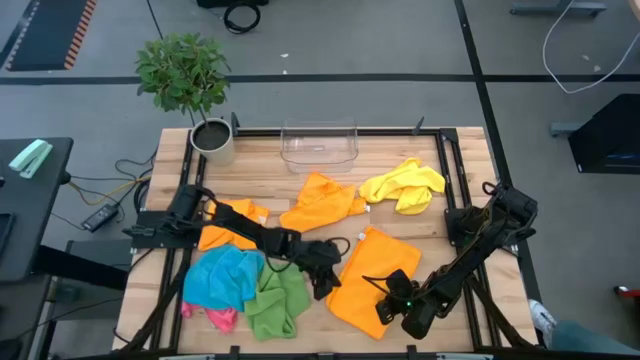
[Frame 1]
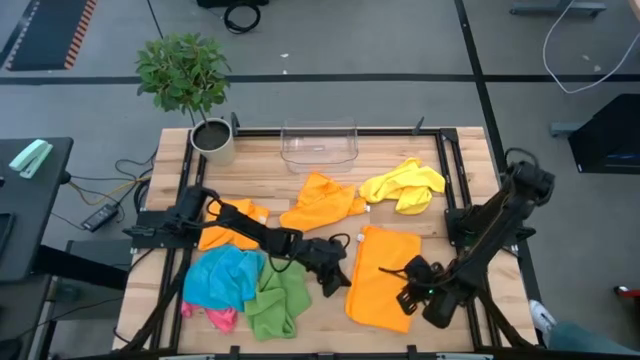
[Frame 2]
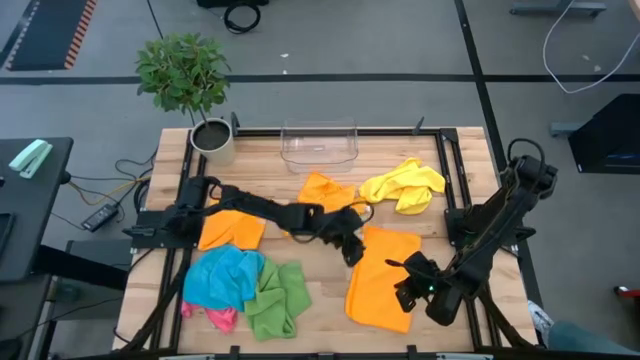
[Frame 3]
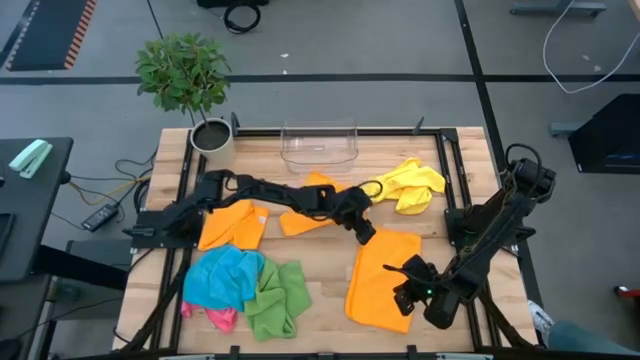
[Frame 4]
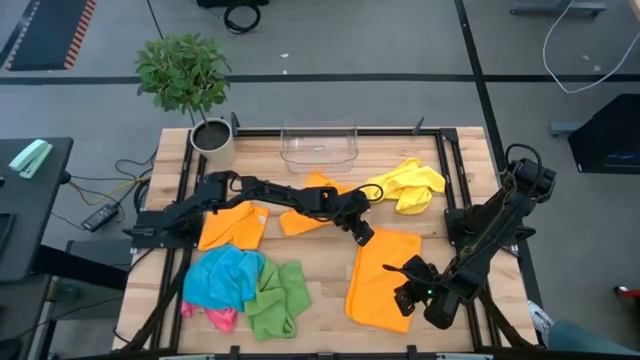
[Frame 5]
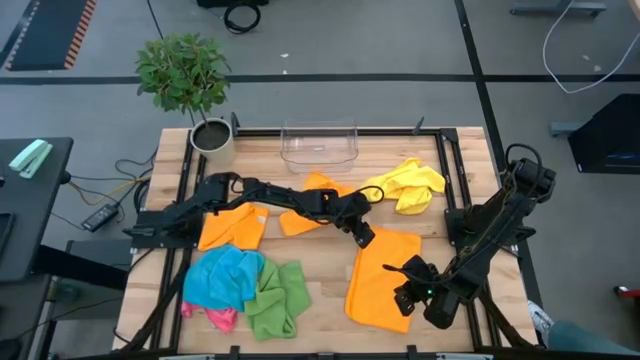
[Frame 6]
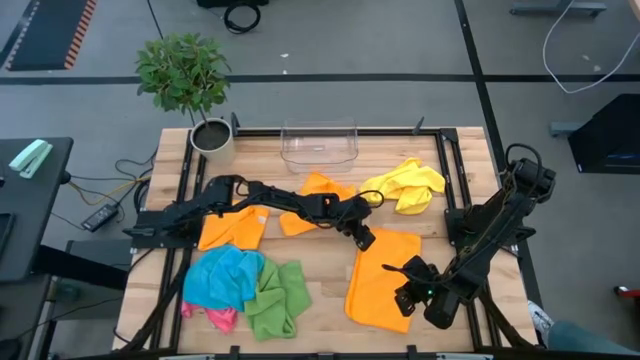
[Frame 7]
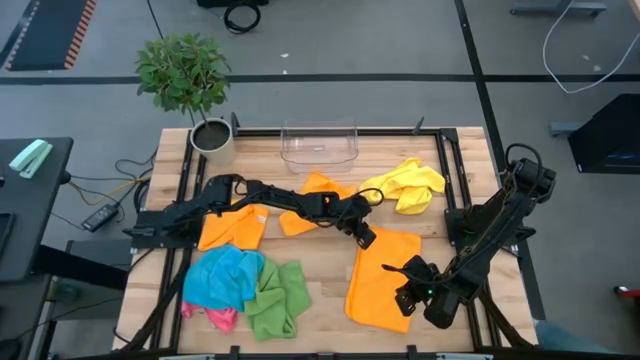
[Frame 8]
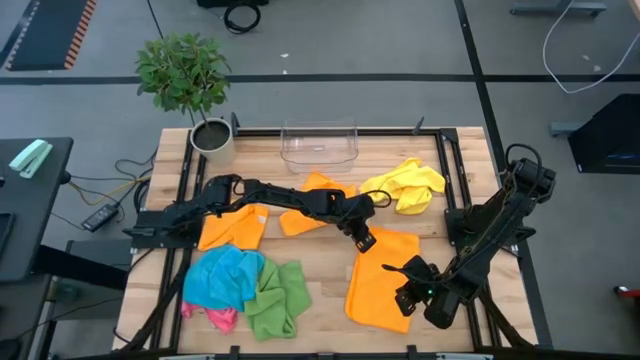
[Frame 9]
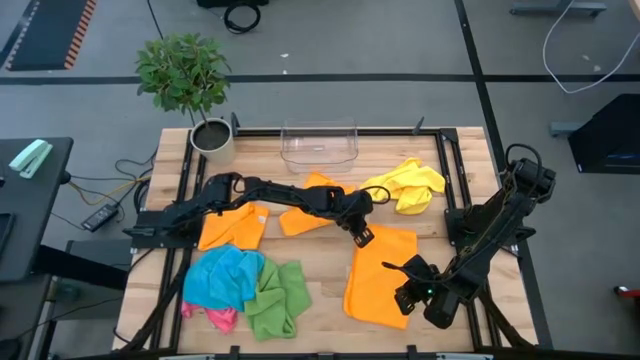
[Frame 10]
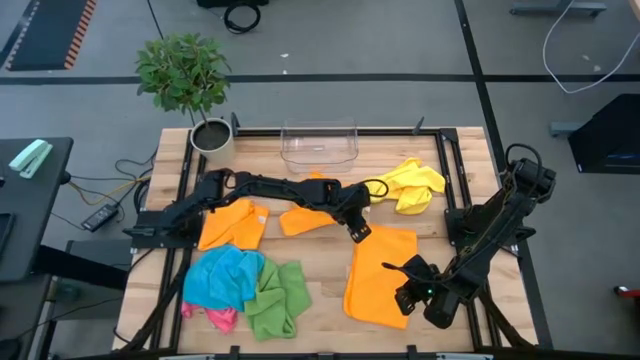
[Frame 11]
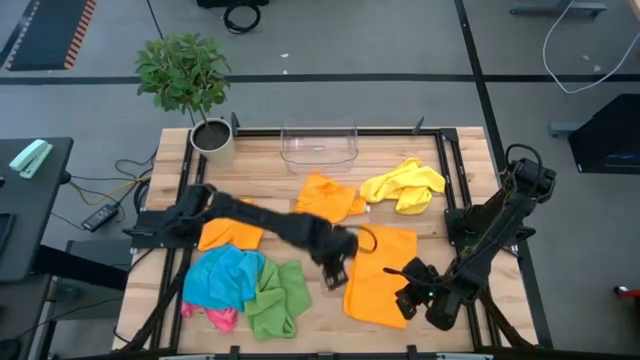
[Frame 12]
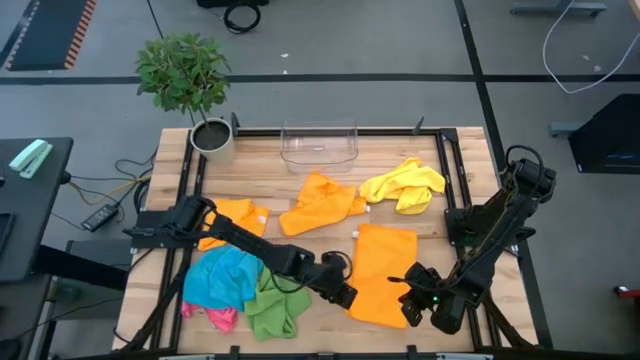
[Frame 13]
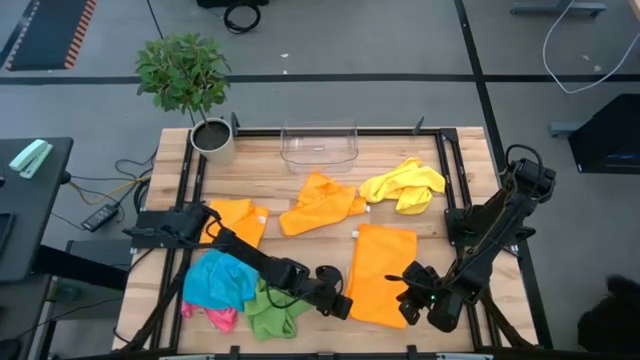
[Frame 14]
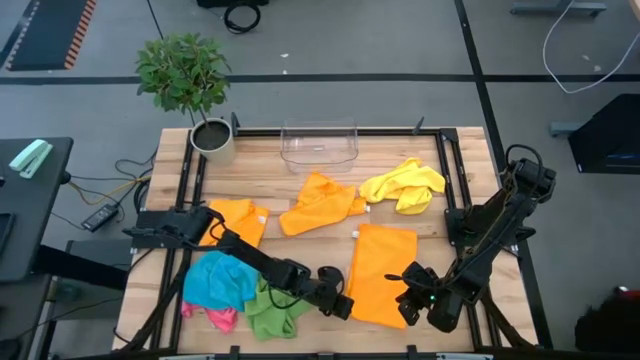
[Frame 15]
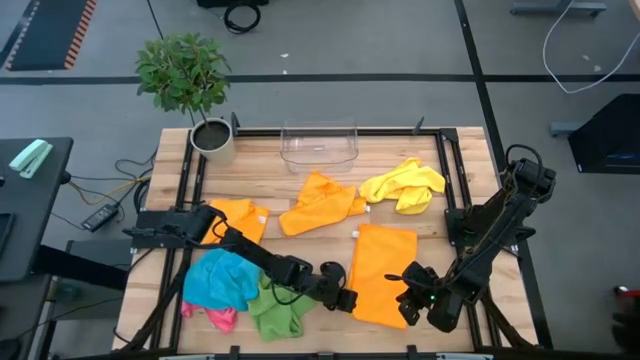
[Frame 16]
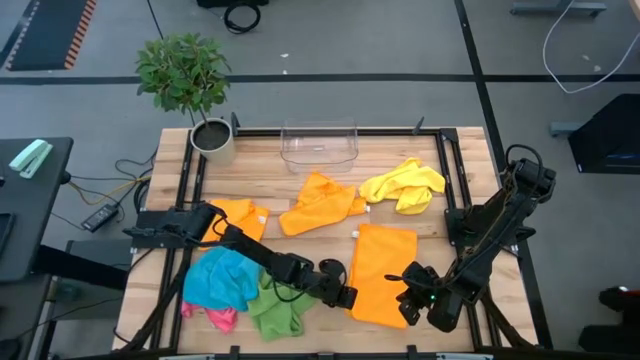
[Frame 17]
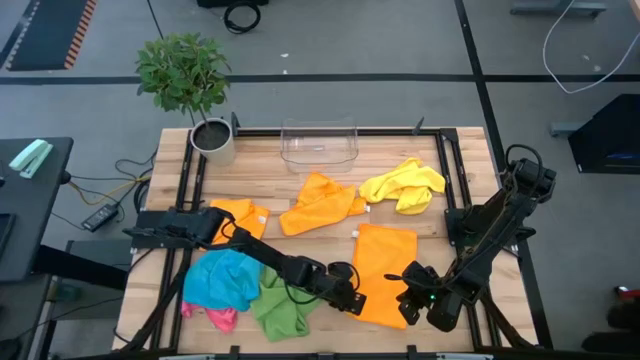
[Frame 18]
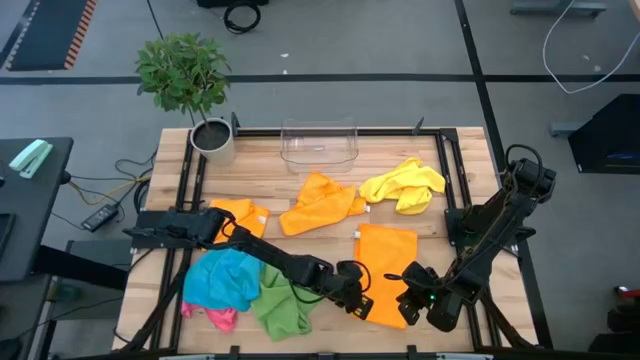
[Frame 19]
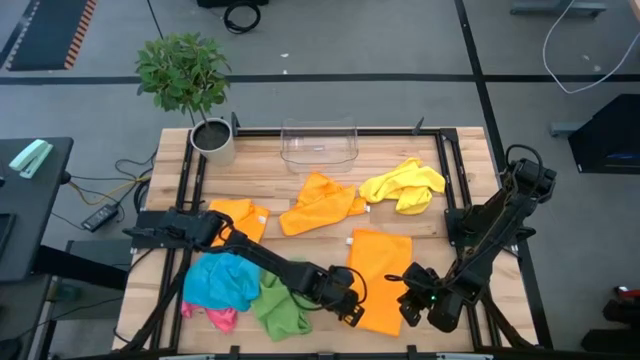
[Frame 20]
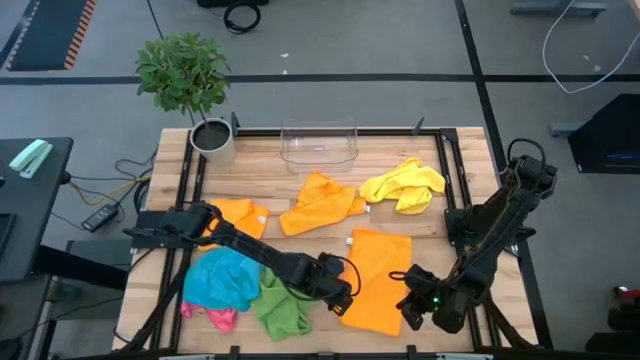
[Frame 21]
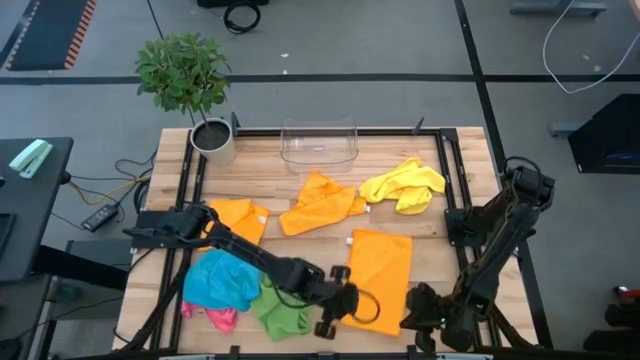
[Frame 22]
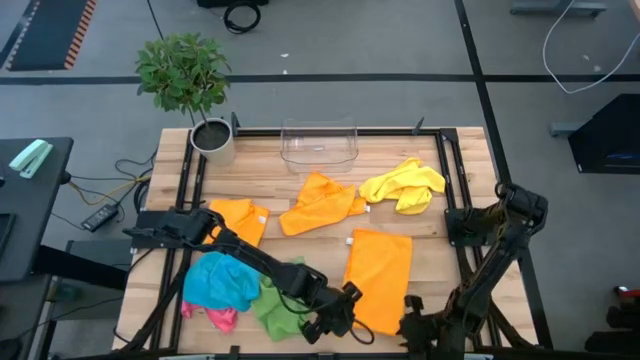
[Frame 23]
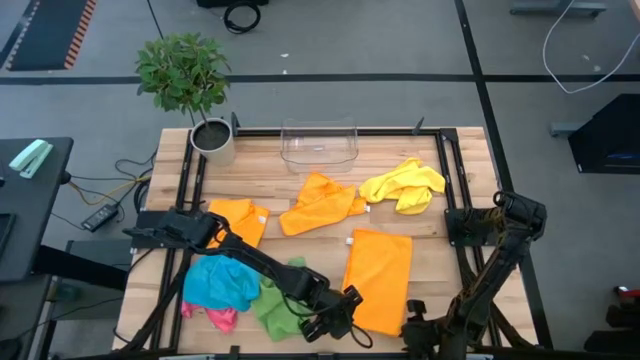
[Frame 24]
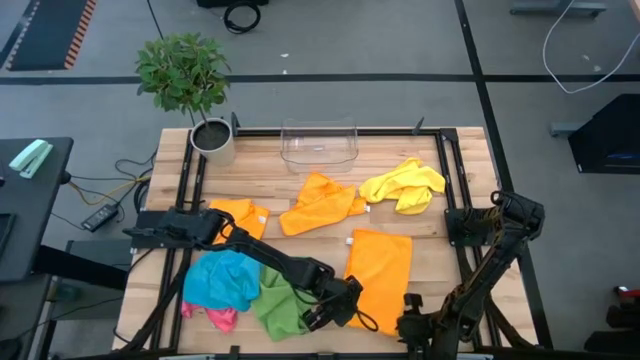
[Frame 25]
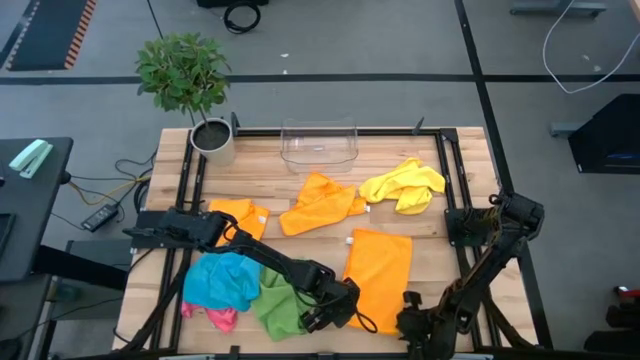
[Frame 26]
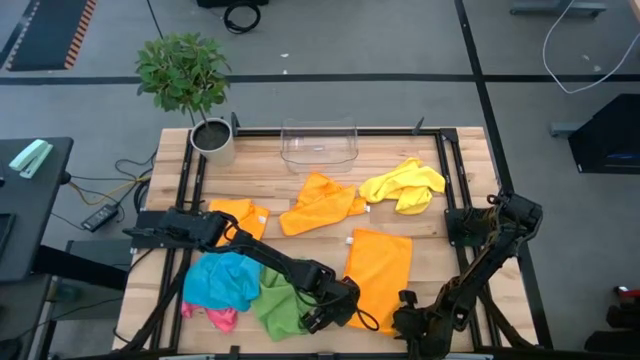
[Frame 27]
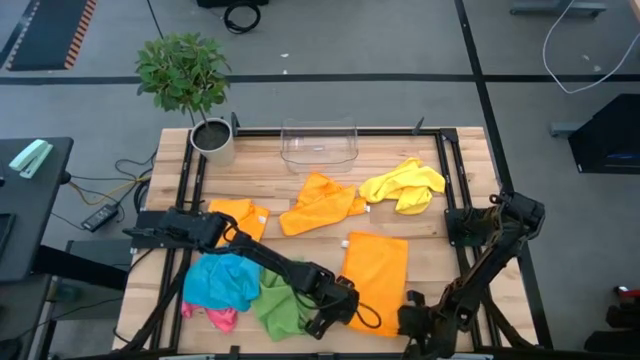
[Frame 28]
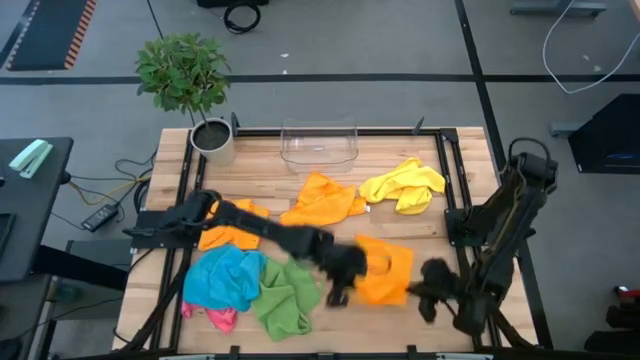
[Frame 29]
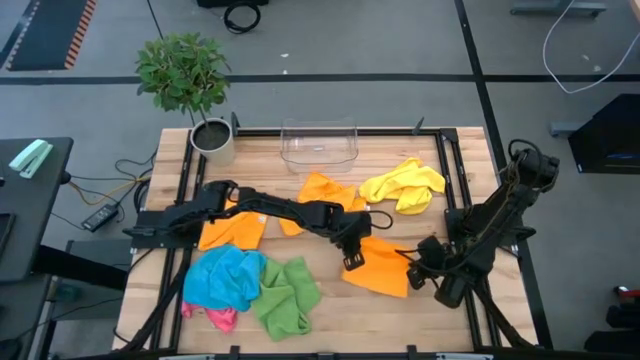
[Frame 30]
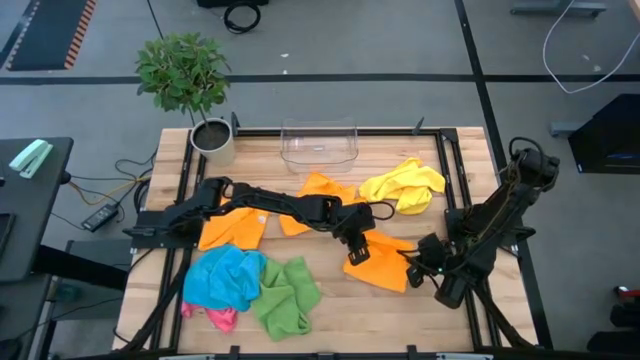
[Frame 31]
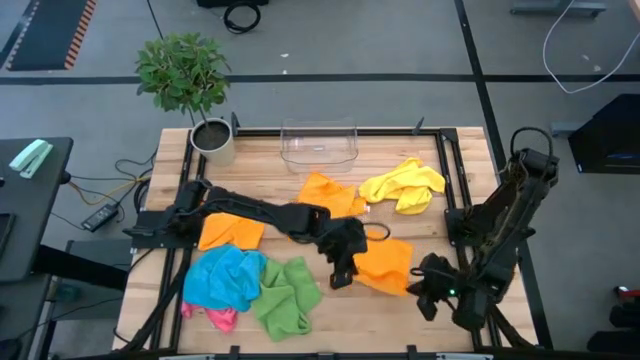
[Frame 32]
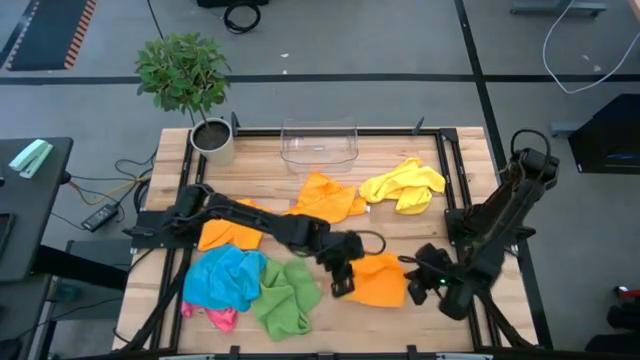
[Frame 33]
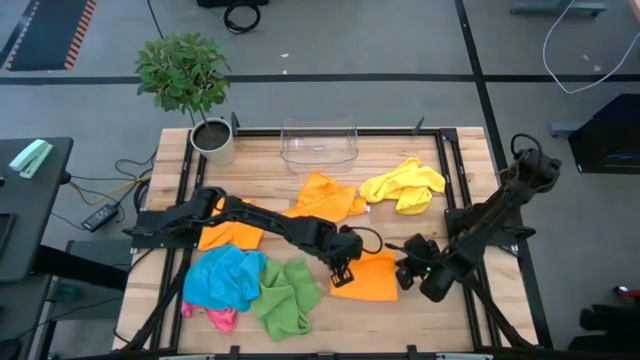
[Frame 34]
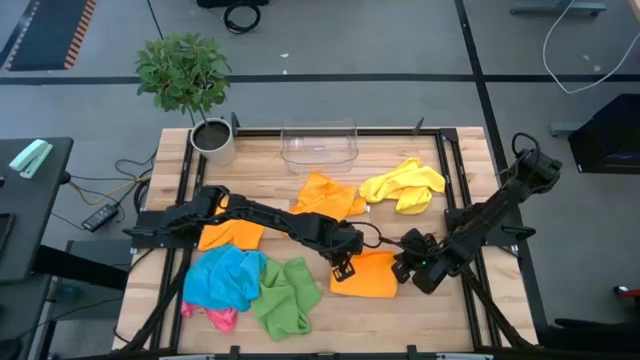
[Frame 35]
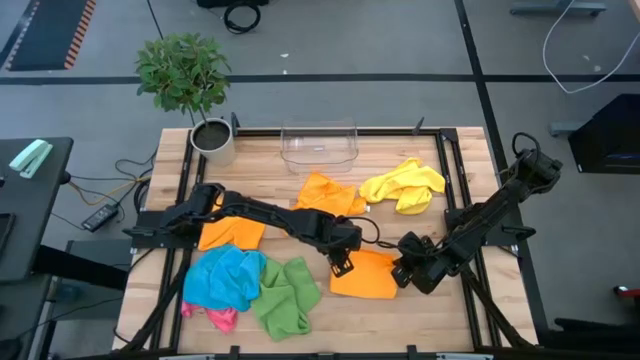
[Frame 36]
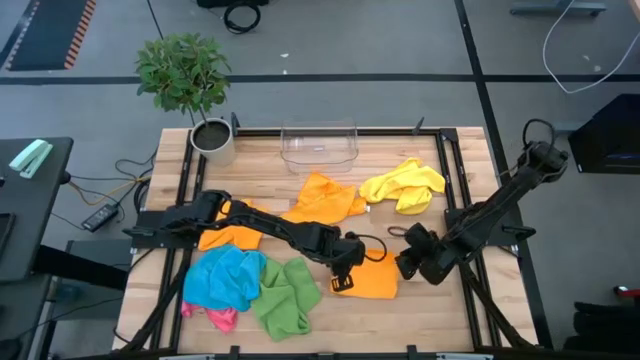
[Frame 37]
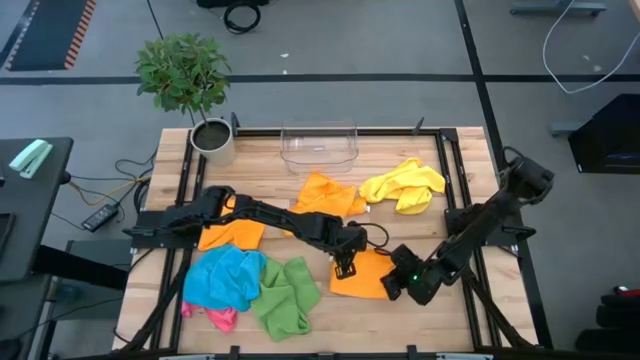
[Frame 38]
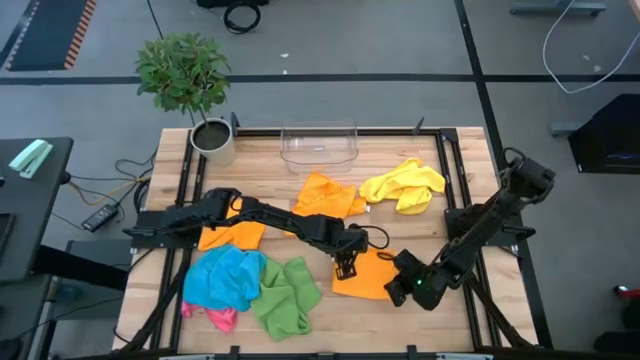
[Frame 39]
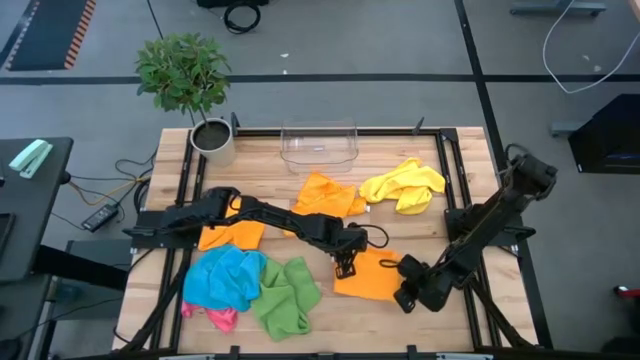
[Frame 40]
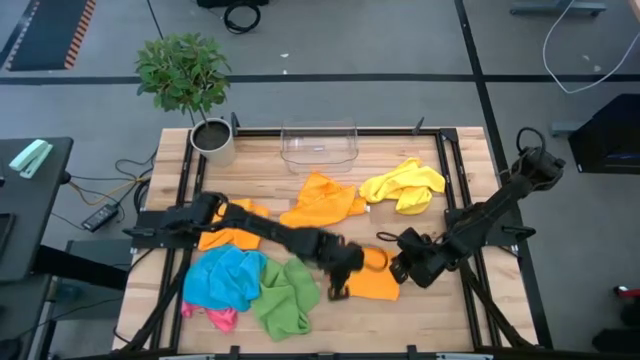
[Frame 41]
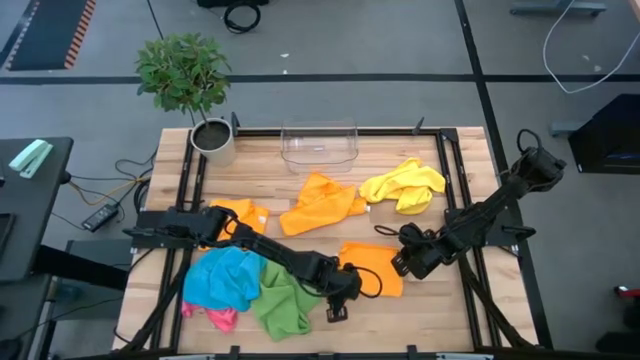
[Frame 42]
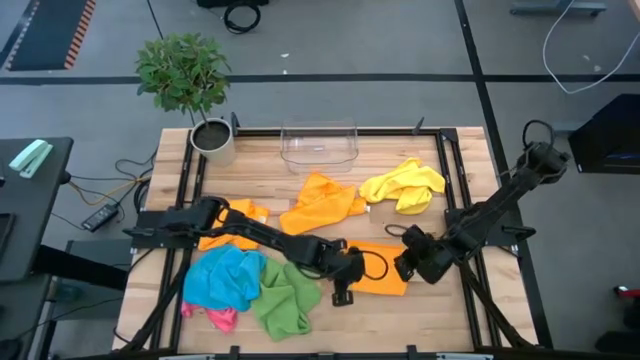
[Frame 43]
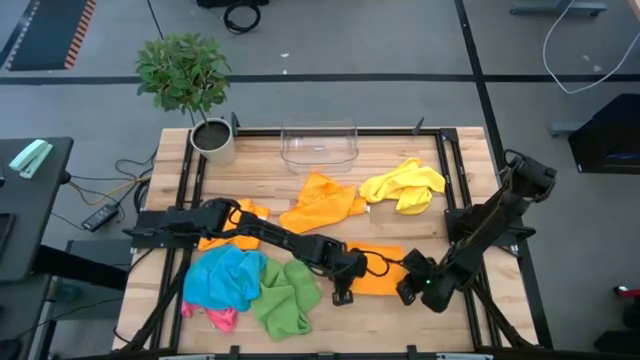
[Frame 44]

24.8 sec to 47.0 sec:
Task: Fold microfiber towels
Fold the bottom orange towel on the table
